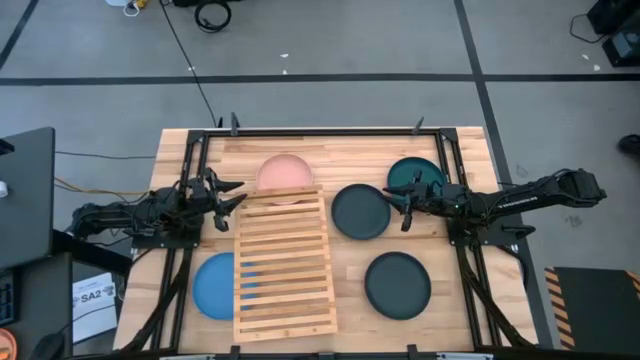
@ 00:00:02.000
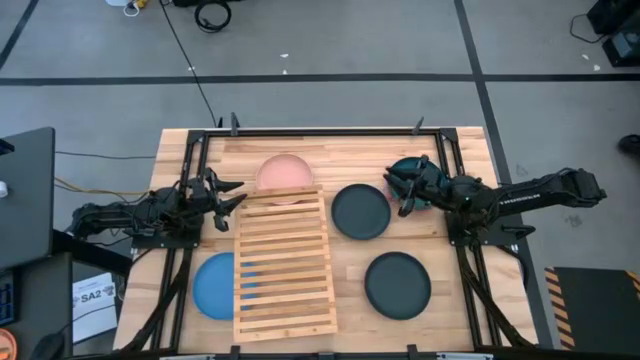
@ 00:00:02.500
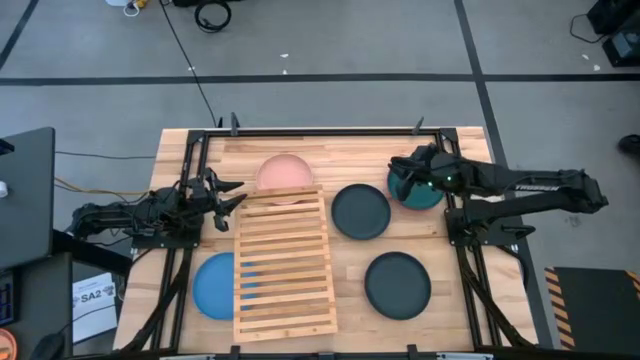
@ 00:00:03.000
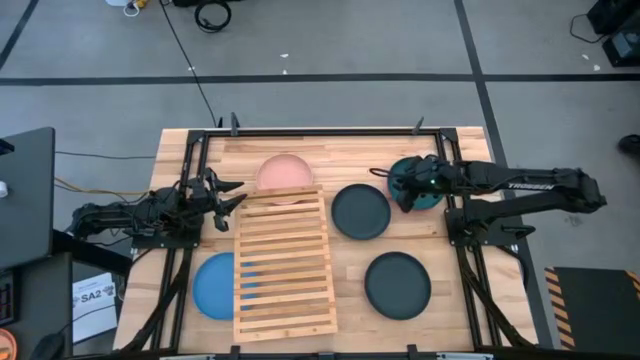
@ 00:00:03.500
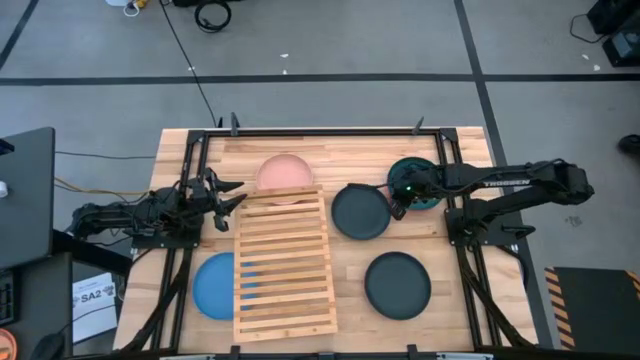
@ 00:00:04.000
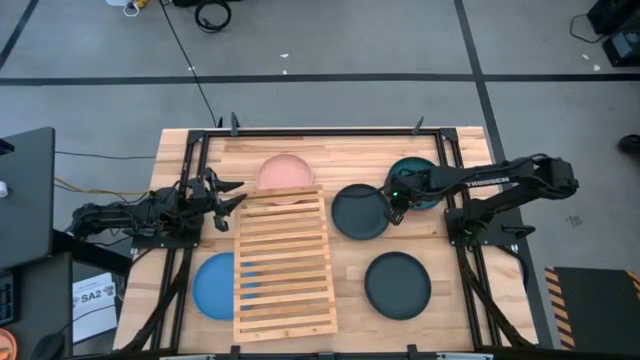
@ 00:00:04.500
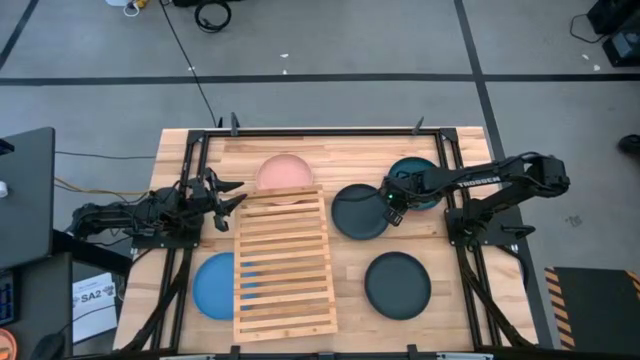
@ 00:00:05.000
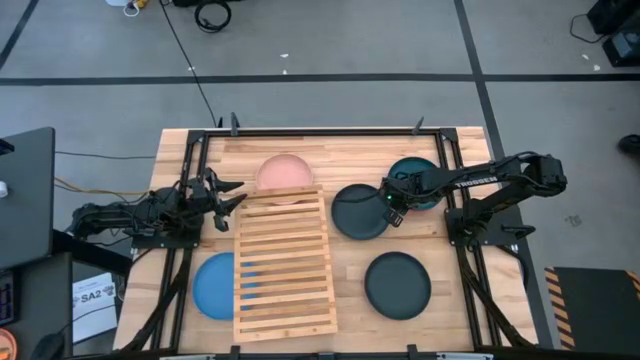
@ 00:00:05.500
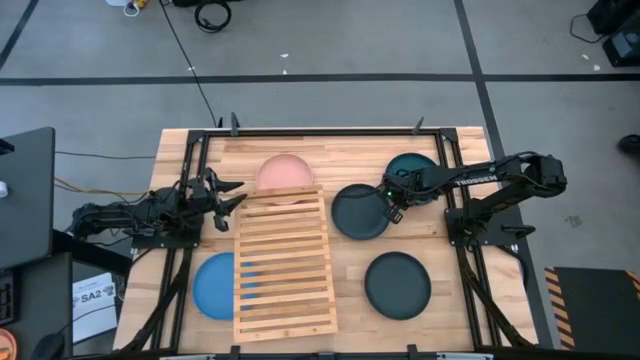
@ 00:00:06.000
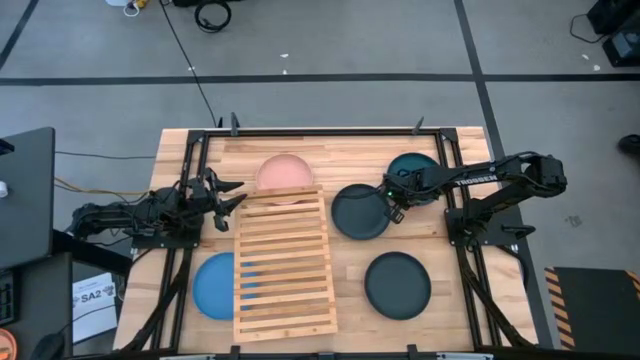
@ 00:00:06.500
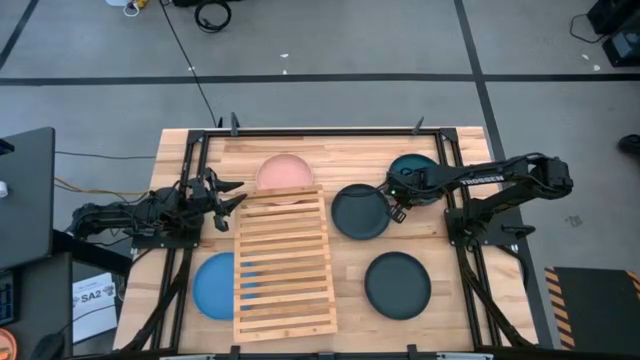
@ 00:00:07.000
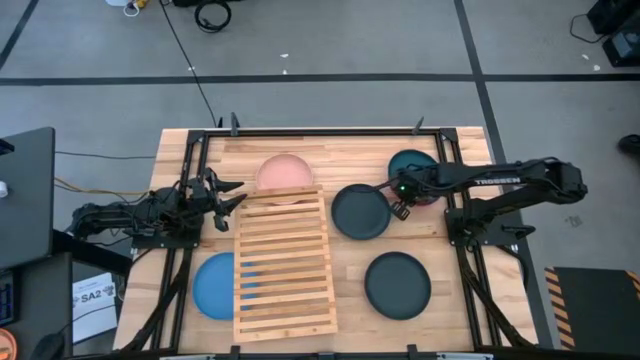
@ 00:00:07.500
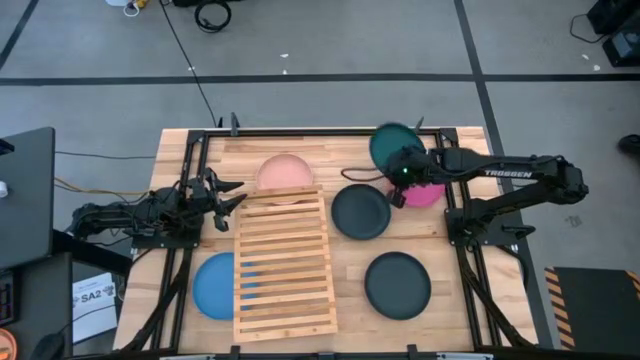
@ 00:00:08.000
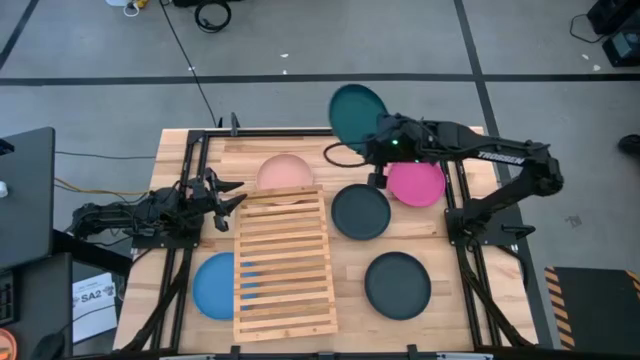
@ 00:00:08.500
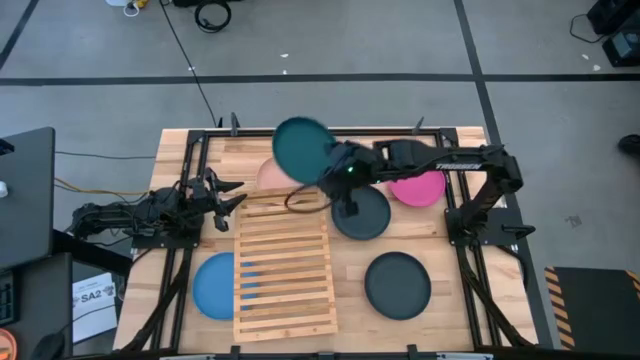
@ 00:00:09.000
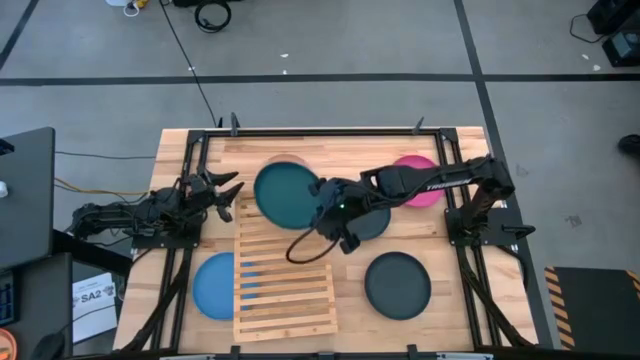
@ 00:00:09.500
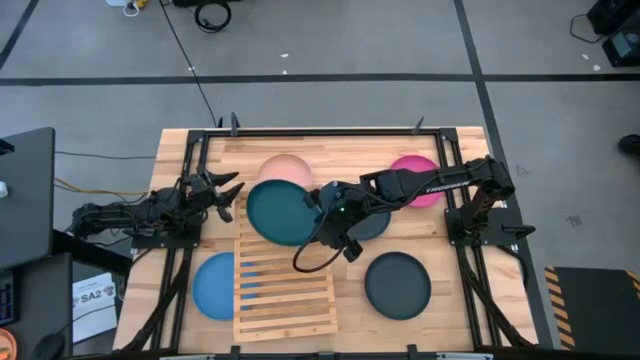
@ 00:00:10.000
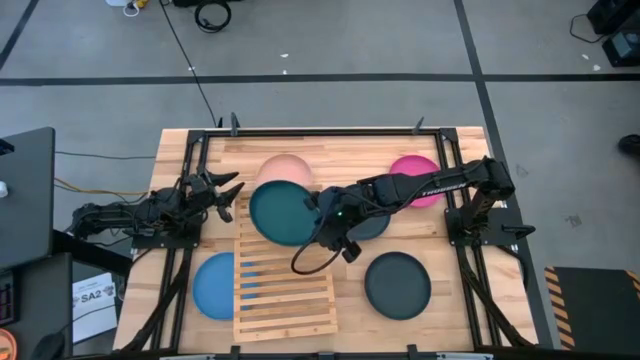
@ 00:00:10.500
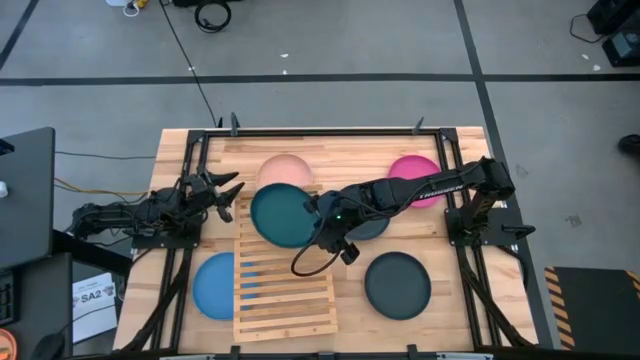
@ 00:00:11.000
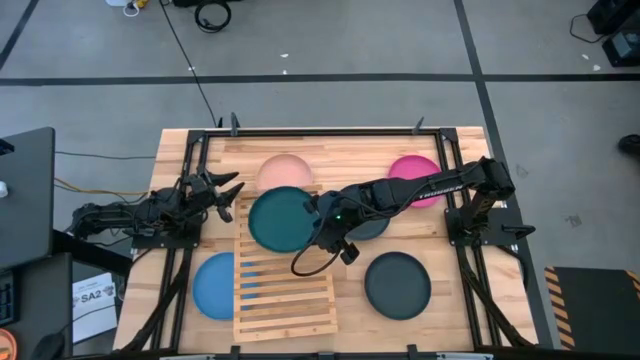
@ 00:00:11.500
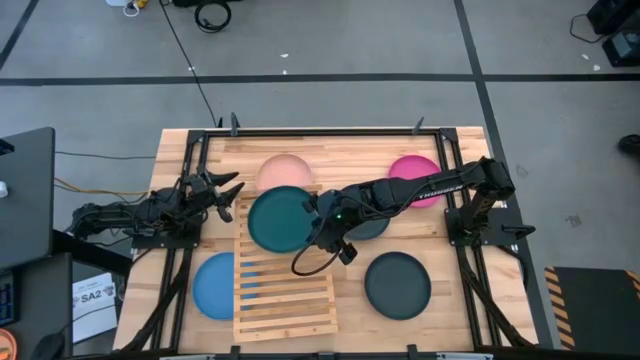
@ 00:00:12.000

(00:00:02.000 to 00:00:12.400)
Task: Place and stack plates onto a shelf
Put the green plate on the shelf

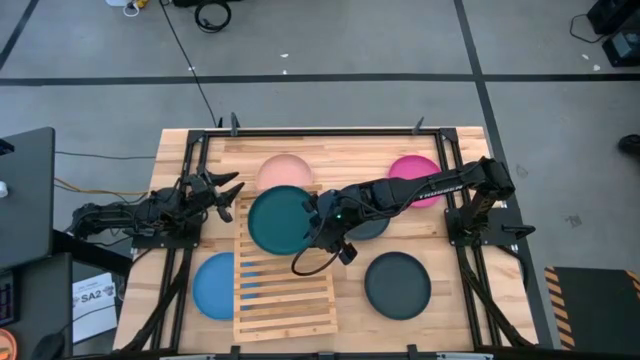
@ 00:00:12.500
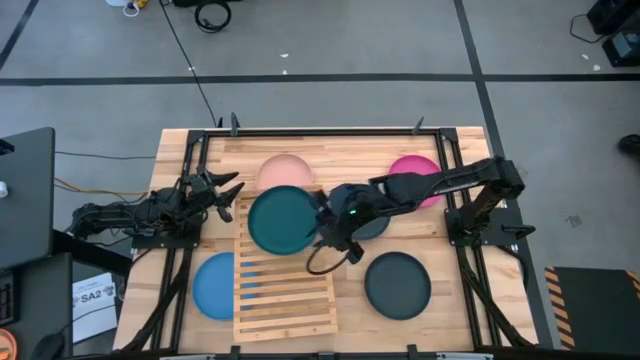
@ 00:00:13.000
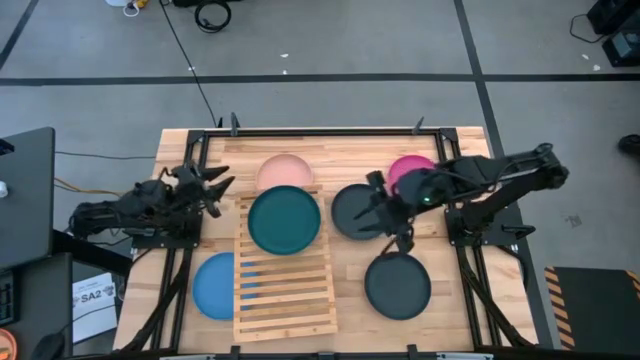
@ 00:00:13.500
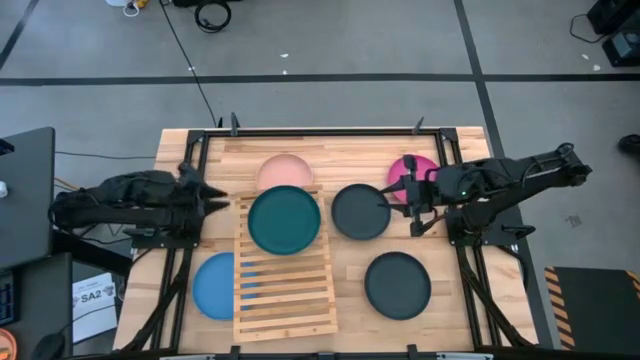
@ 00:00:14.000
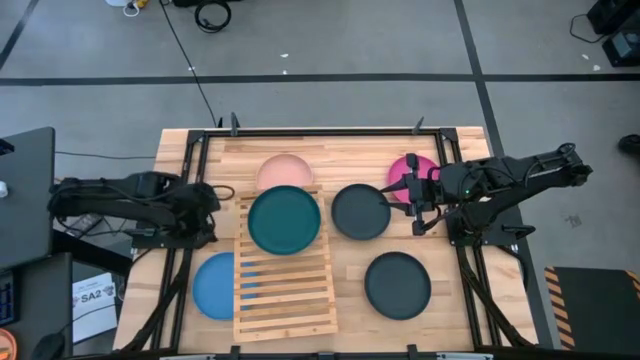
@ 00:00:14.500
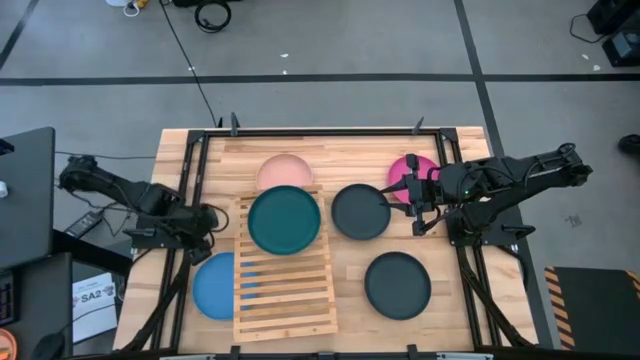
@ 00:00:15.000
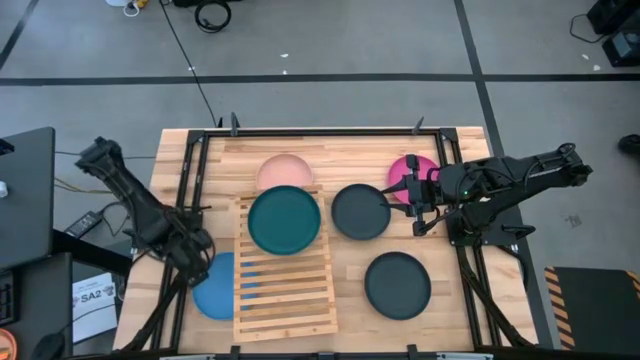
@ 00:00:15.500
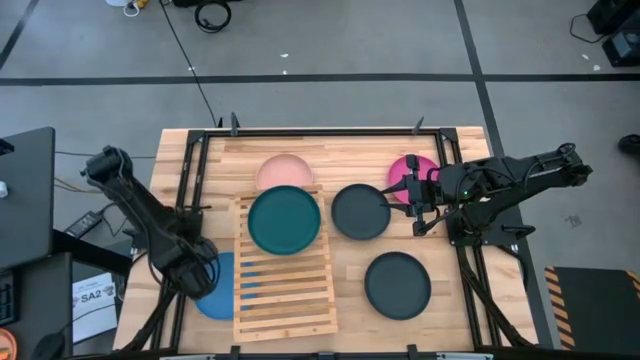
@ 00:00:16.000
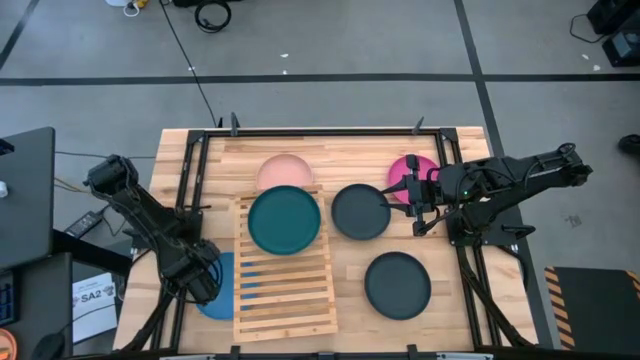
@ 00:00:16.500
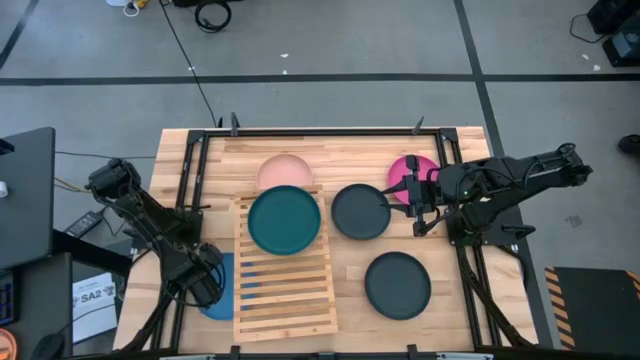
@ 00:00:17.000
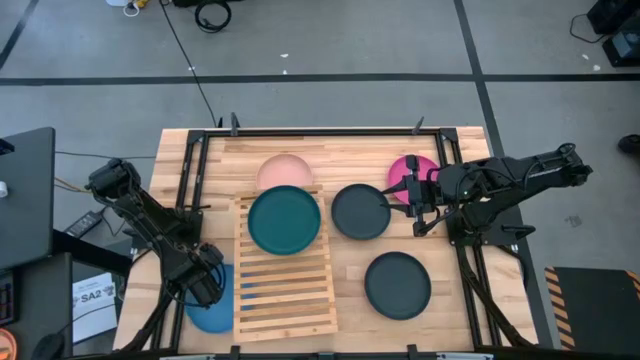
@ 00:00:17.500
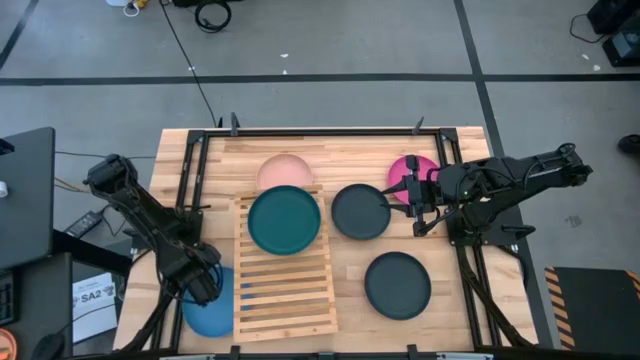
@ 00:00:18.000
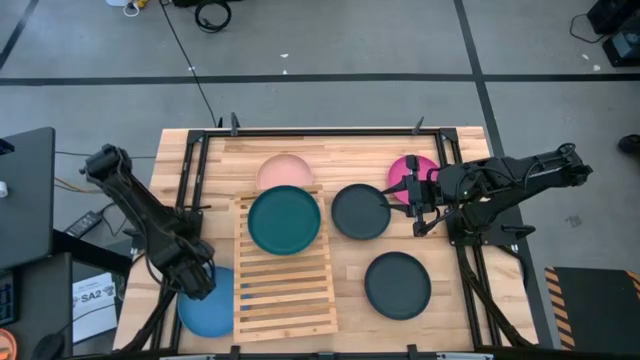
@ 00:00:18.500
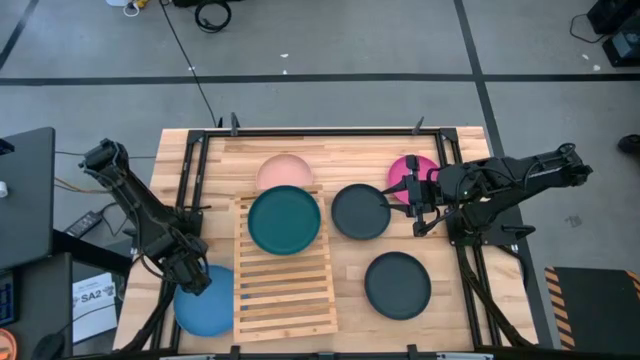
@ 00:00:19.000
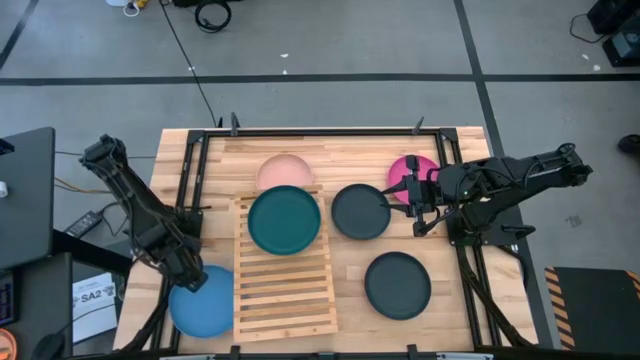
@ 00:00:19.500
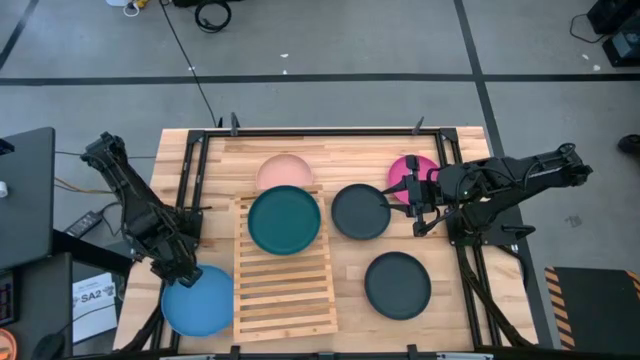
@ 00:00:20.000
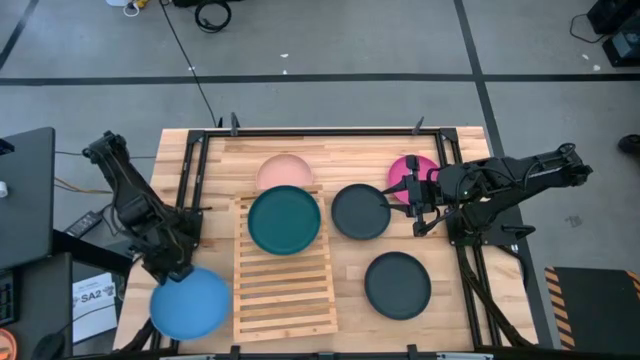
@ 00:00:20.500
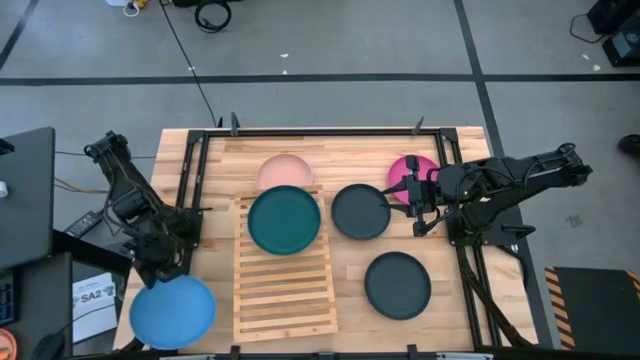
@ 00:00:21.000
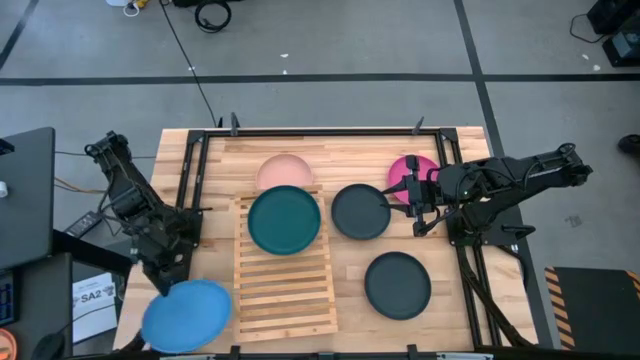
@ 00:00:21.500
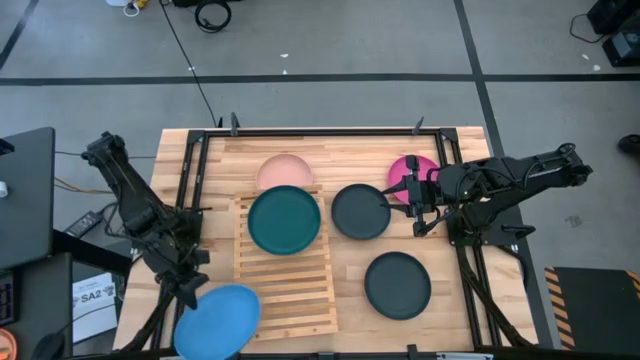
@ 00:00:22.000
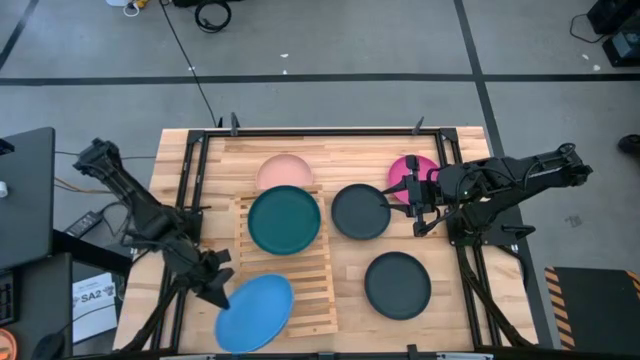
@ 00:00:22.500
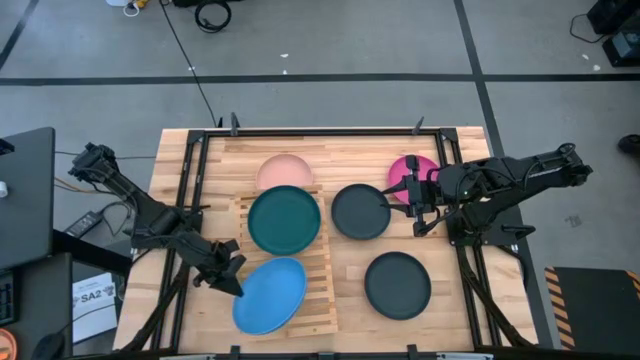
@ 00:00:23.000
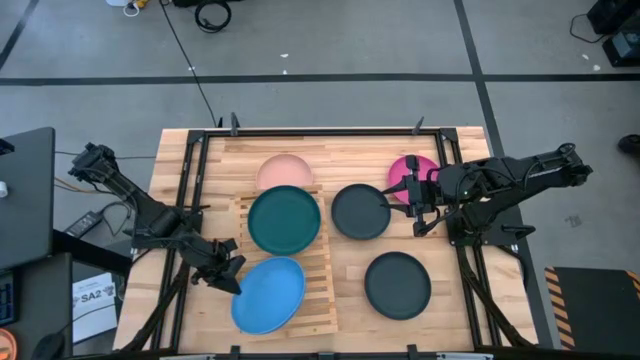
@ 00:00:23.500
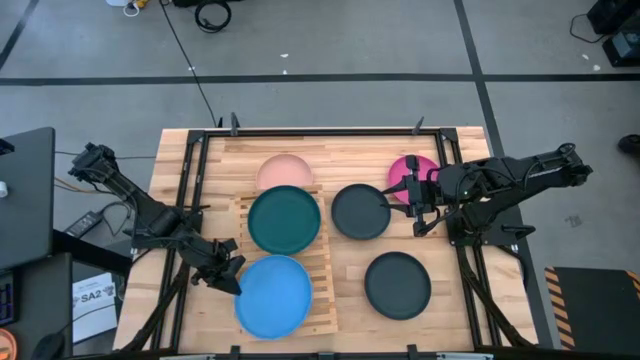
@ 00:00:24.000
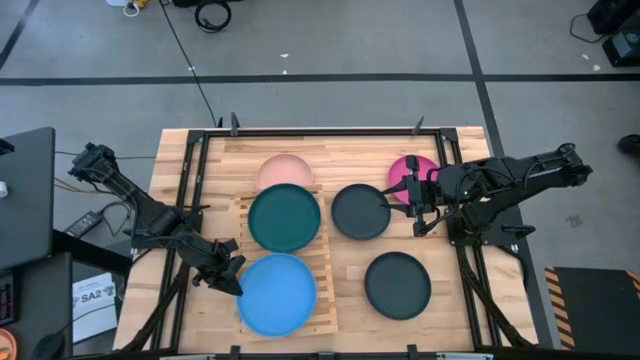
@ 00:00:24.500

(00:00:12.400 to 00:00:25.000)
Put the blue plate on the shelf
